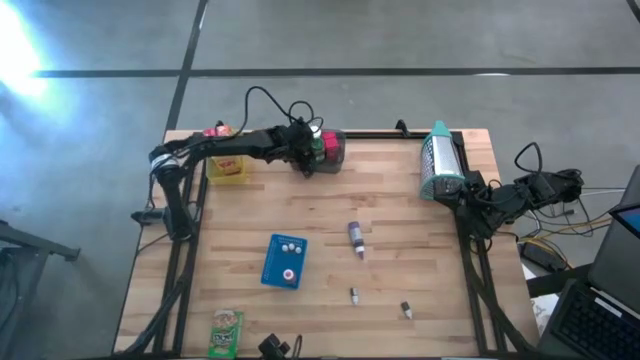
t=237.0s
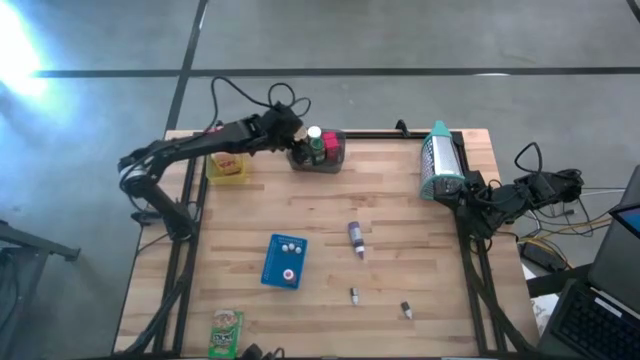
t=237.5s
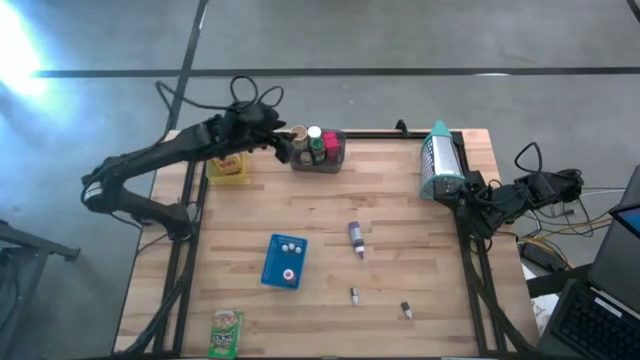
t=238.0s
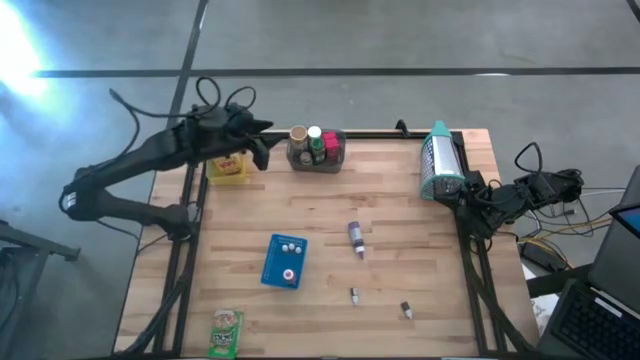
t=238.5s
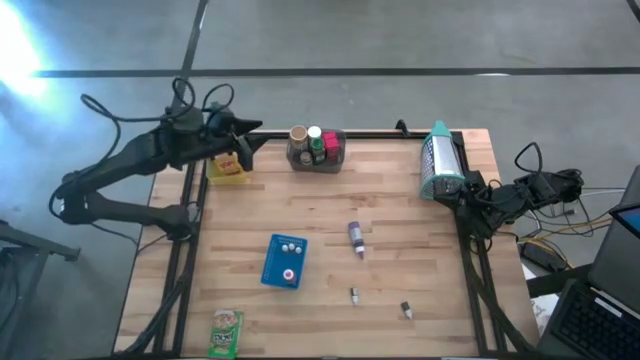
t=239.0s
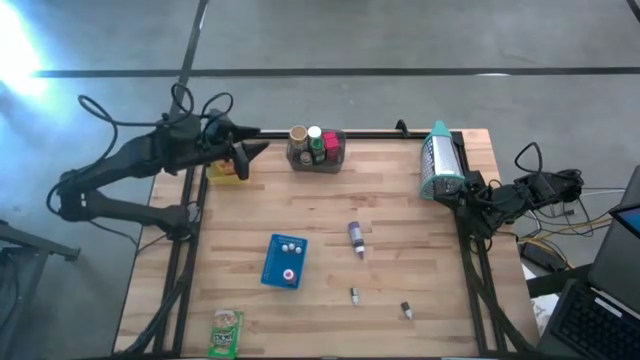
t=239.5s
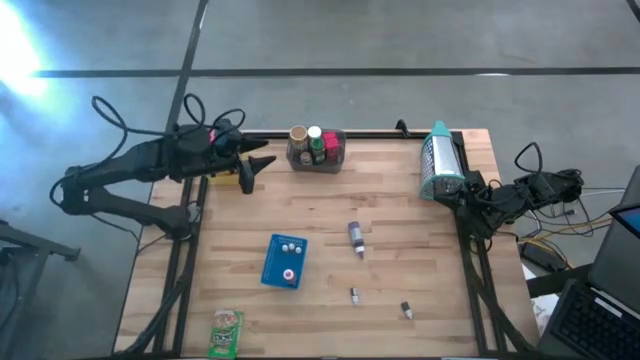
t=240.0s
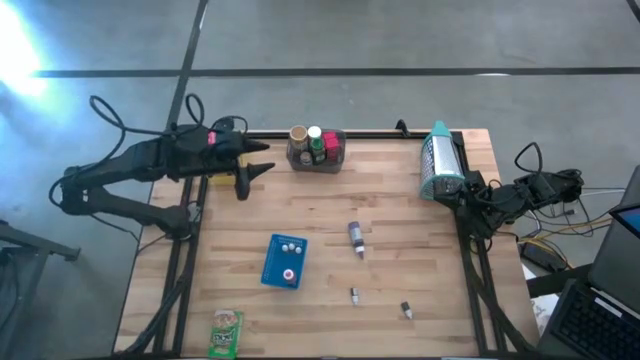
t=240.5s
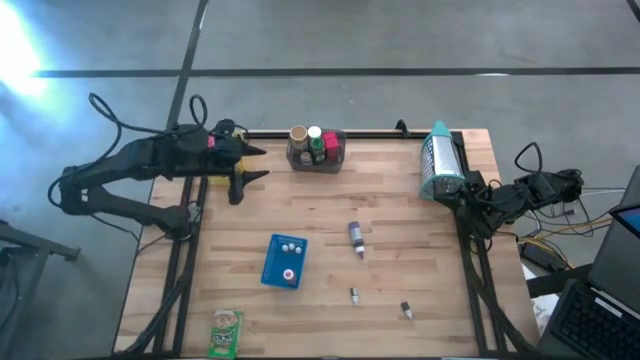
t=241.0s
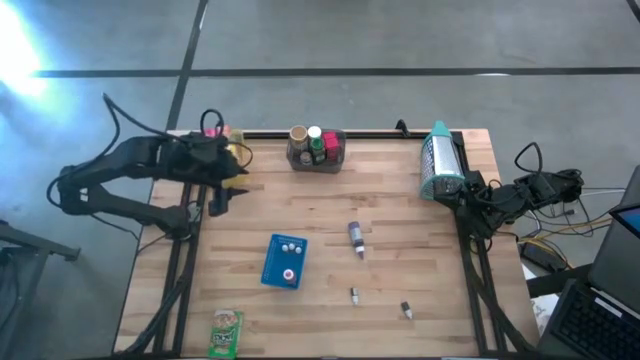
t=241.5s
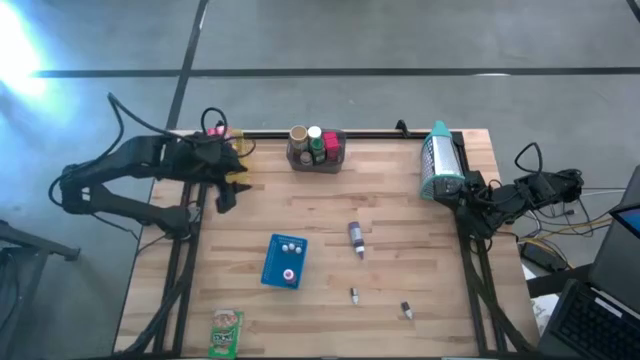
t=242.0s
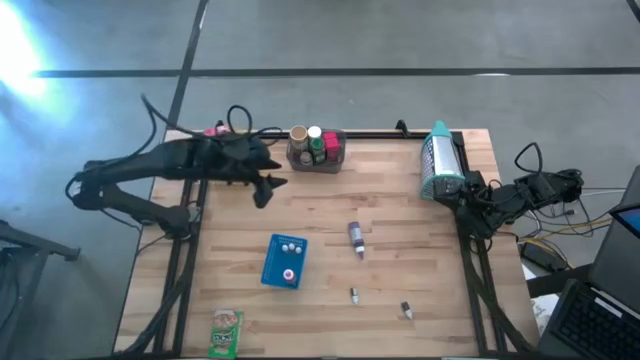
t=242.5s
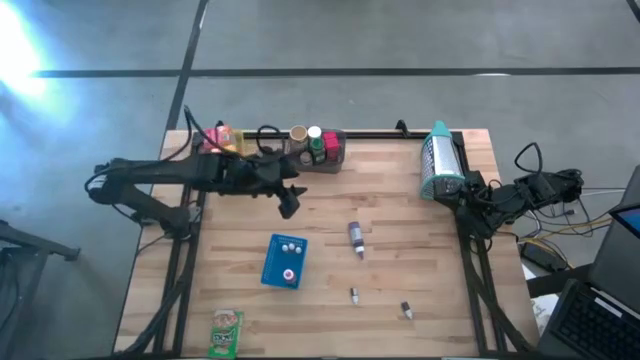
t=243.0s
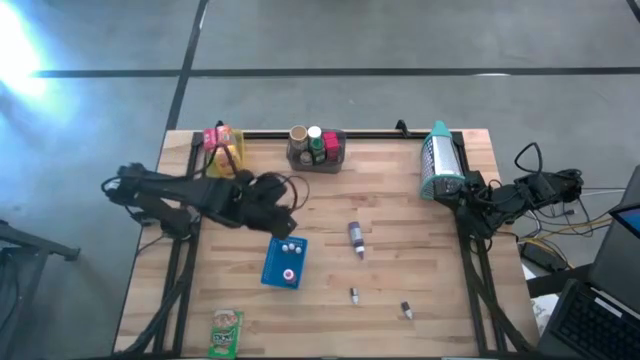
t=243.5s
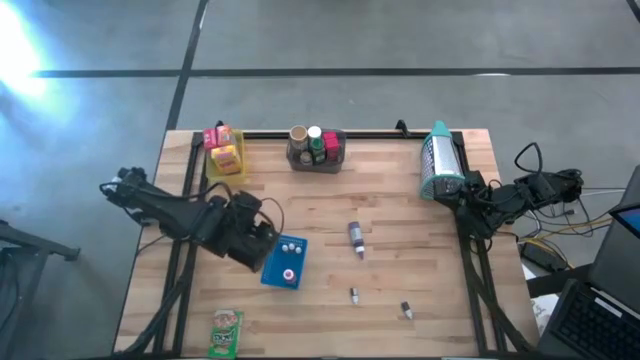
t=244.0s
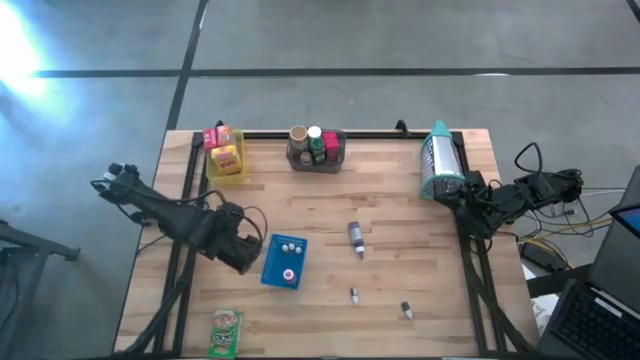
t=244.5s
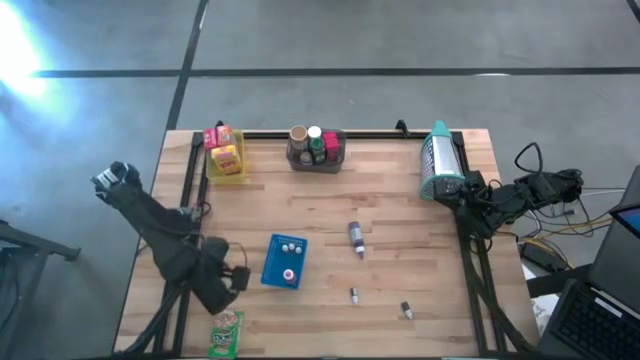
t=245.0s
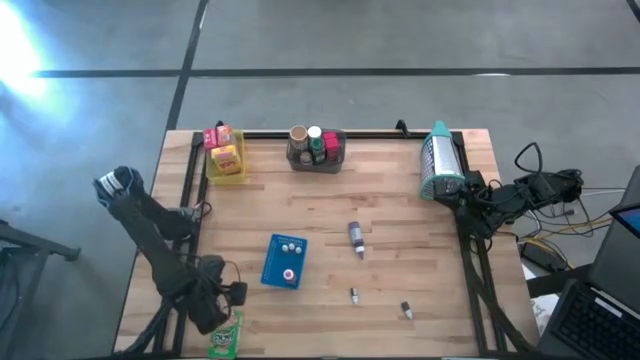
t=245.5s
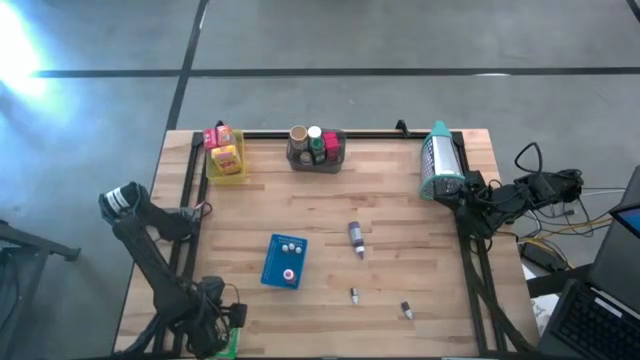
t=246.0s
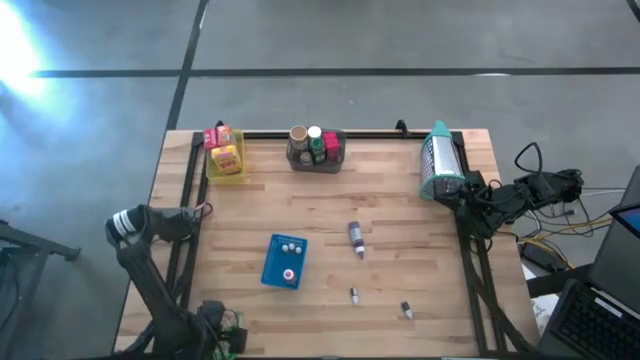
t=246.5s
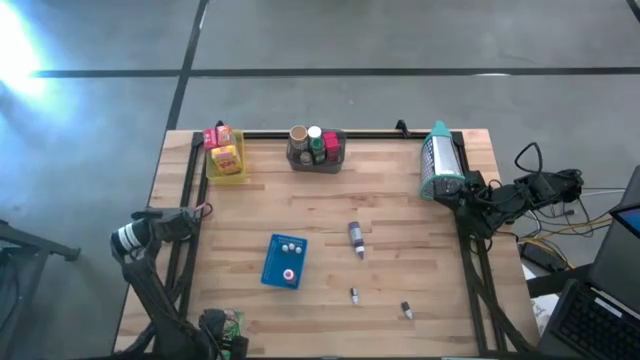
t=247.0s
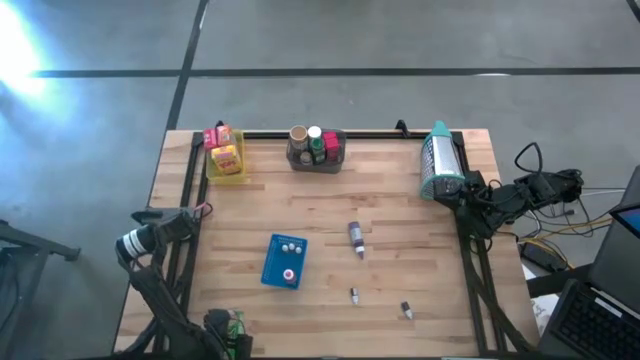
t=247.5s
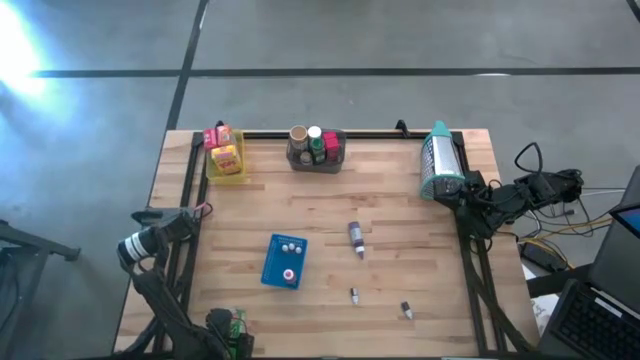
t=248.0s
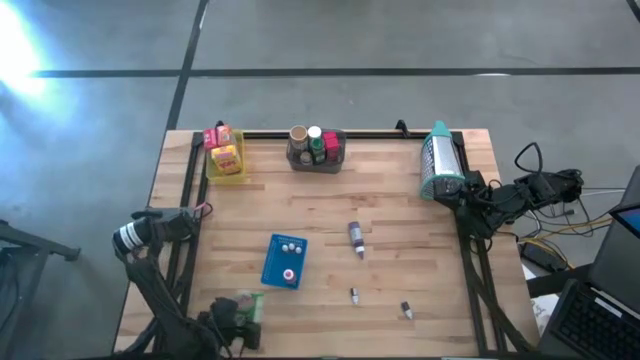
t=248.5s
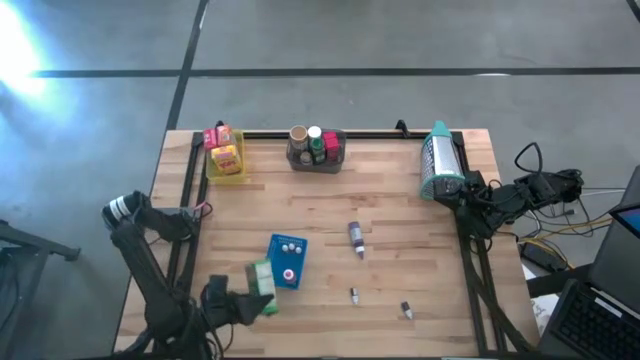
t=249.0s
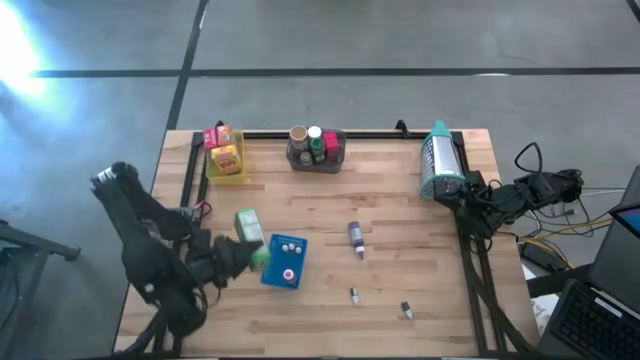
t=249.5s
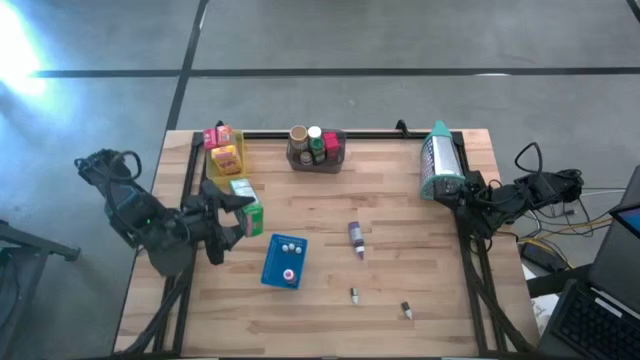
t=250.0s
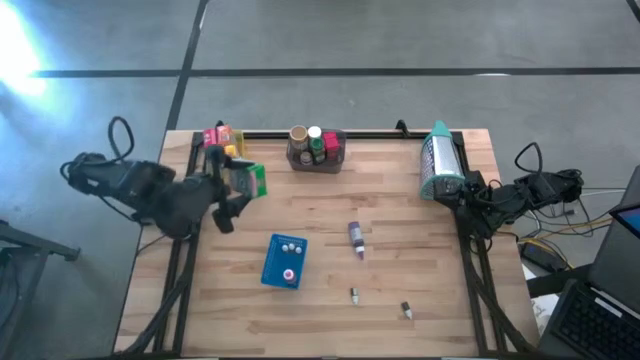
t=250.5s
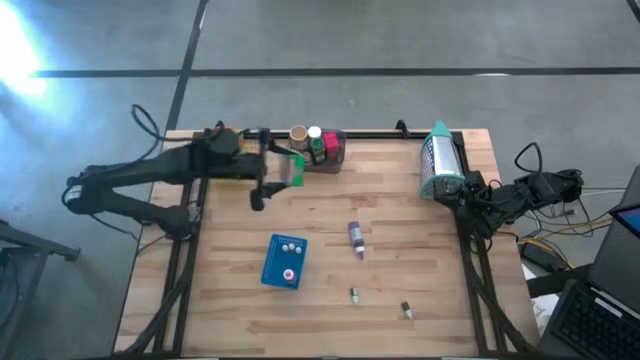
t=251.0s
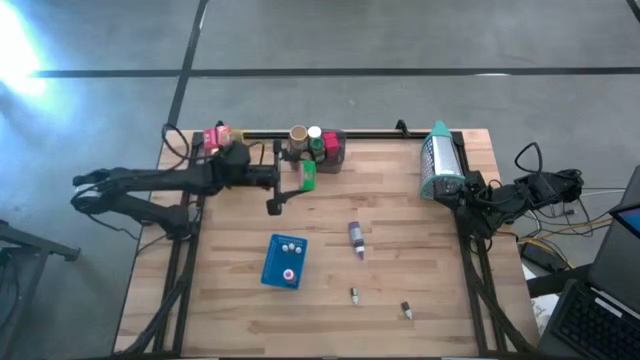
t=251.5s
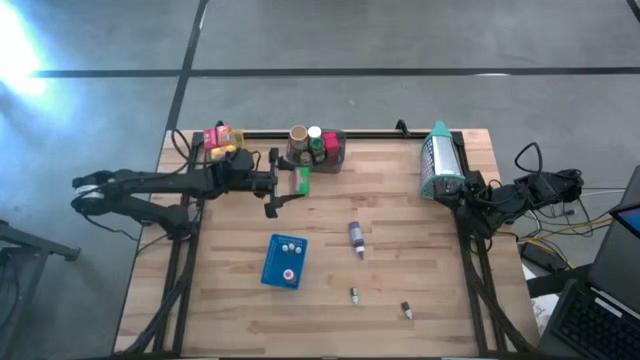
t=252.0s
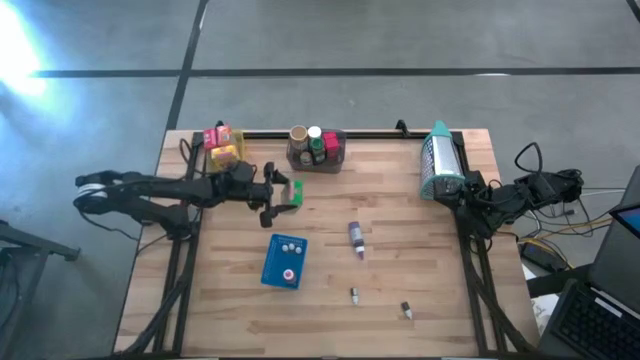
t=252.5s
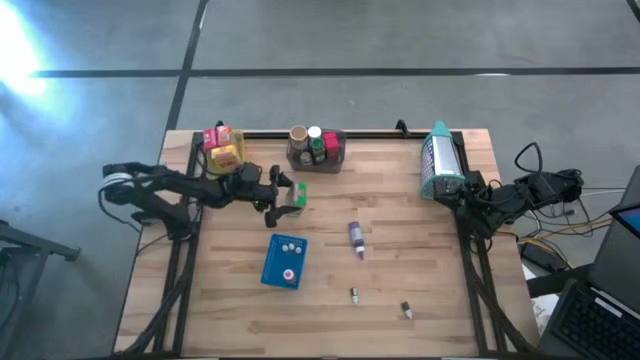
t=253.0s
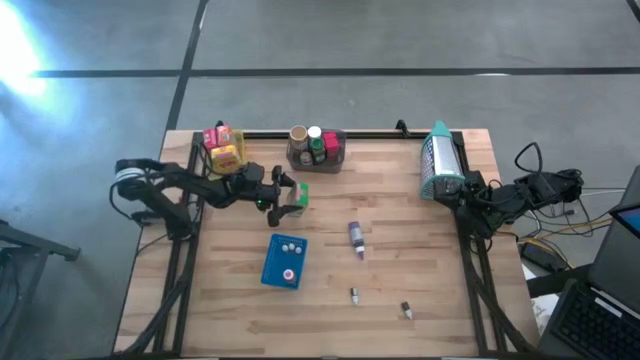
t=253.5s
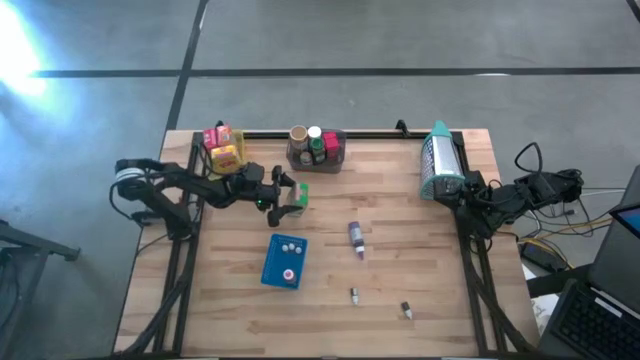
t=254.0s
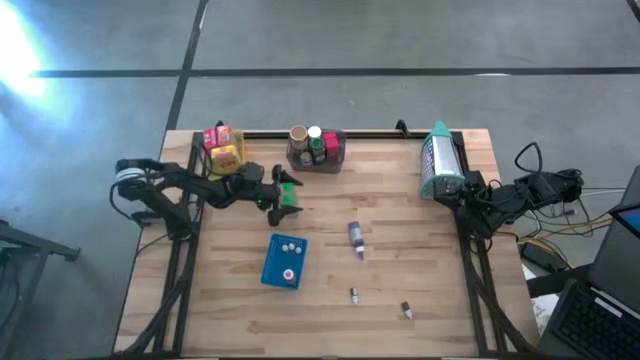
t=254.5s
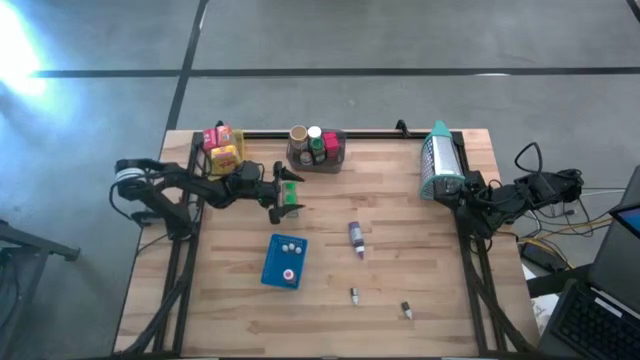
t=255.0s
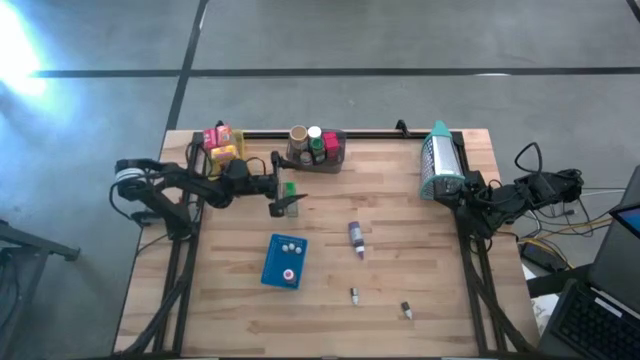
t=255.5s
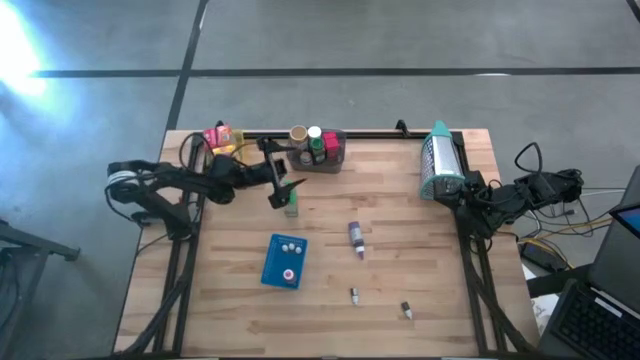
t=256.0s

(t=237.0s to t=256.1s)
Task: Pick & Place Kitchen Items
Put the green cereal box into the yellow bin

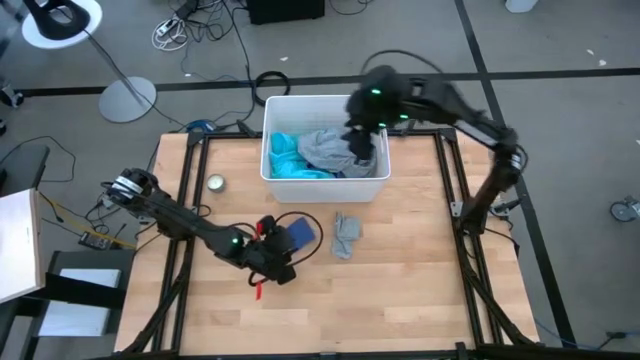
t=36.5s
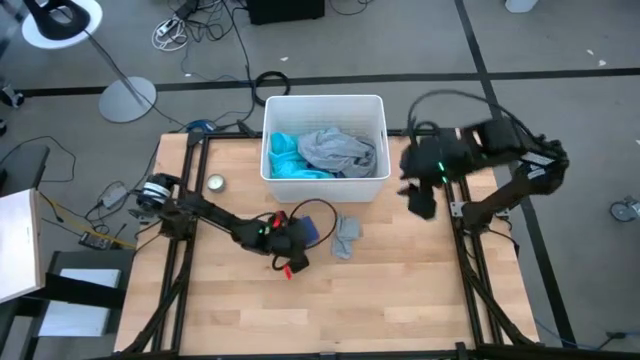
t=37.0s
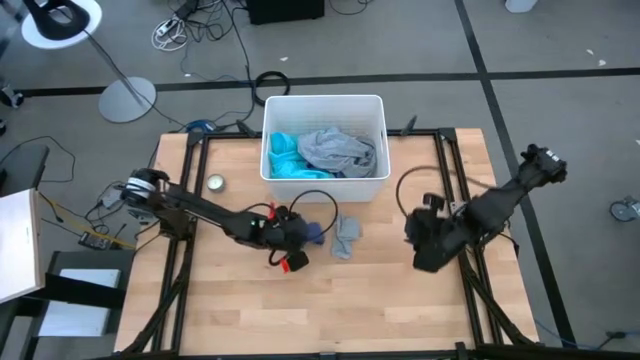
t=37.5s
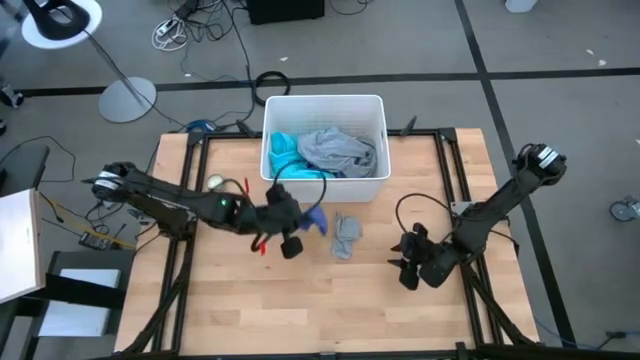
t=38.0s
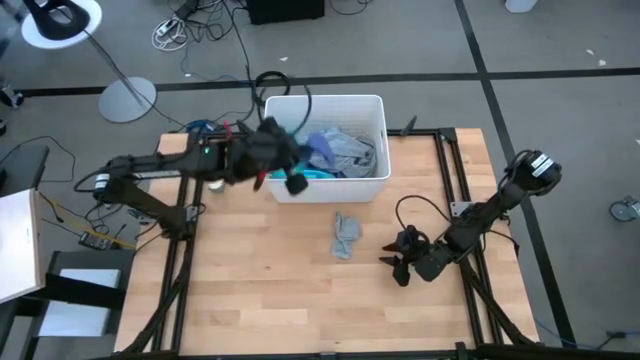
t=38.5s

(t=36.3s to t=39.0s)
Task: Sort clothes
Put the blue sock into the laundry bin
